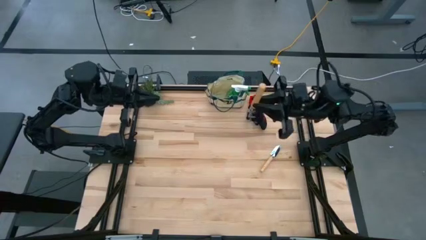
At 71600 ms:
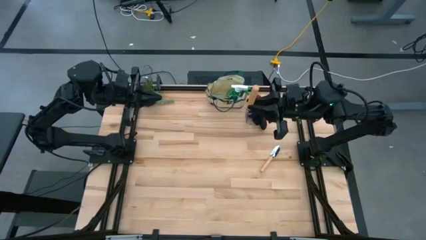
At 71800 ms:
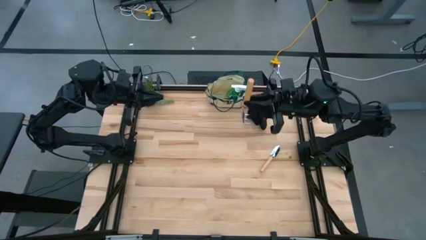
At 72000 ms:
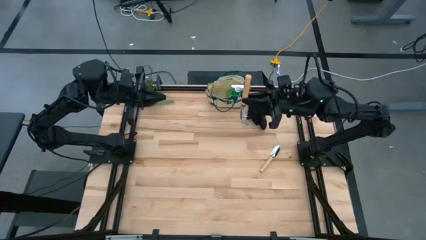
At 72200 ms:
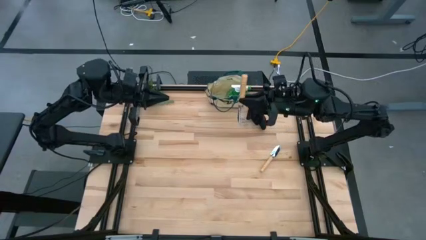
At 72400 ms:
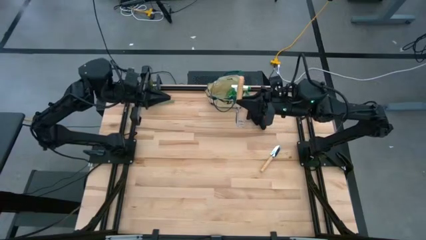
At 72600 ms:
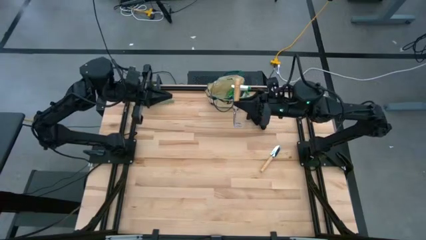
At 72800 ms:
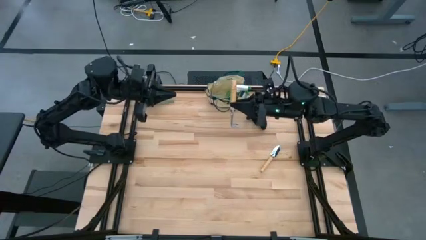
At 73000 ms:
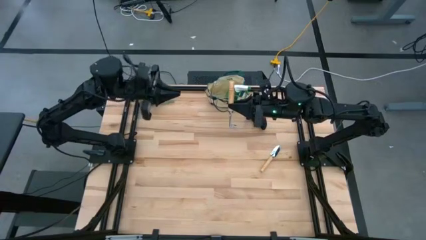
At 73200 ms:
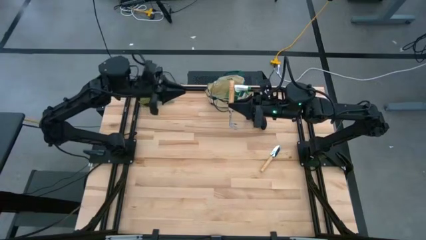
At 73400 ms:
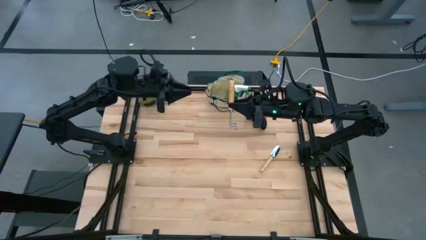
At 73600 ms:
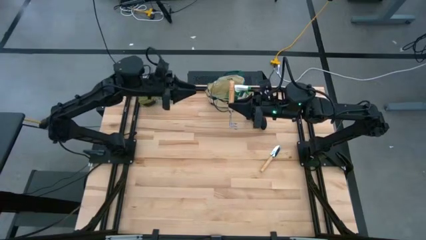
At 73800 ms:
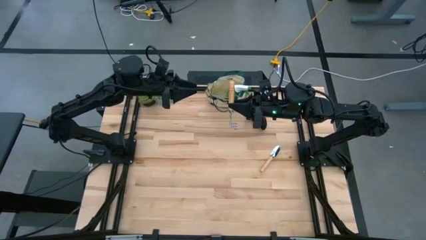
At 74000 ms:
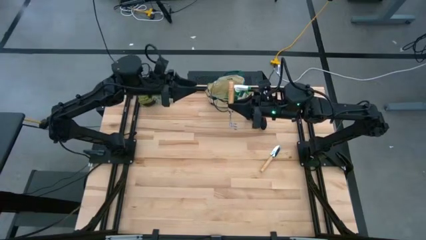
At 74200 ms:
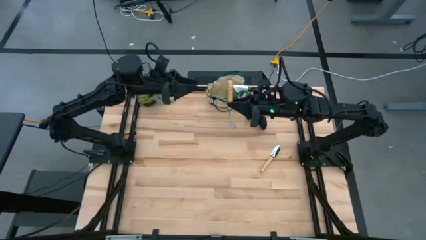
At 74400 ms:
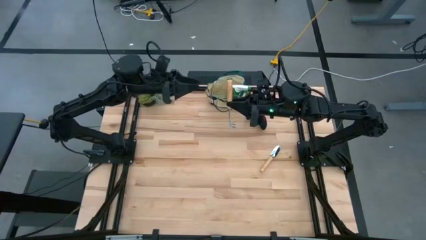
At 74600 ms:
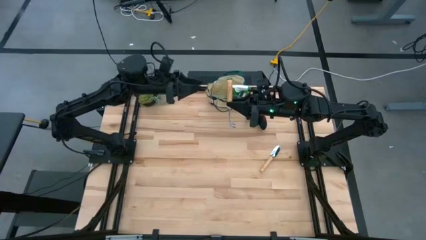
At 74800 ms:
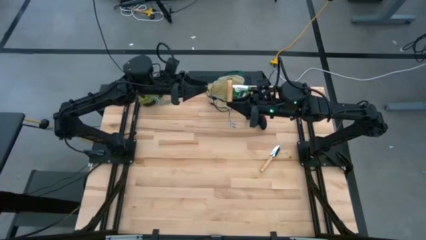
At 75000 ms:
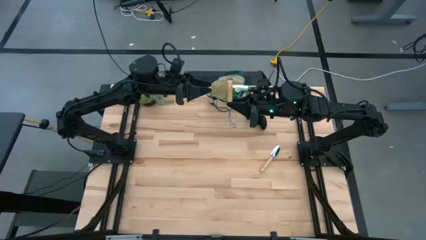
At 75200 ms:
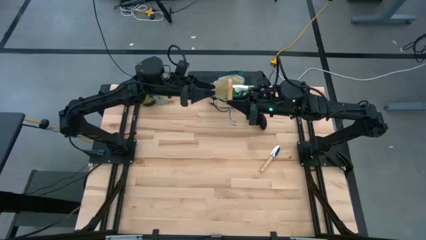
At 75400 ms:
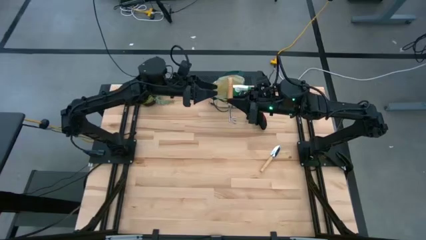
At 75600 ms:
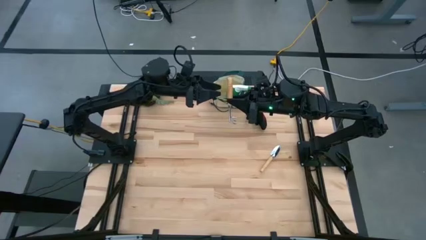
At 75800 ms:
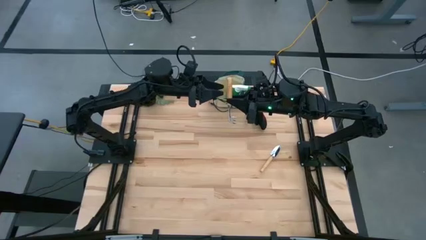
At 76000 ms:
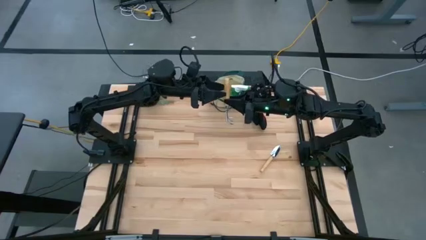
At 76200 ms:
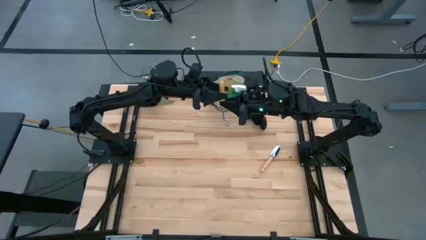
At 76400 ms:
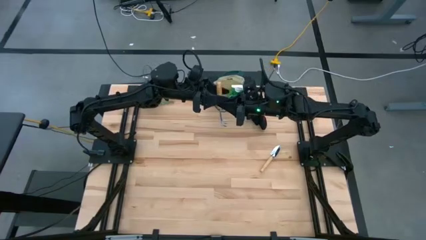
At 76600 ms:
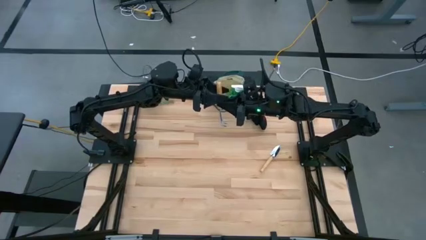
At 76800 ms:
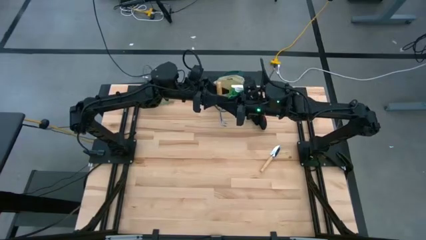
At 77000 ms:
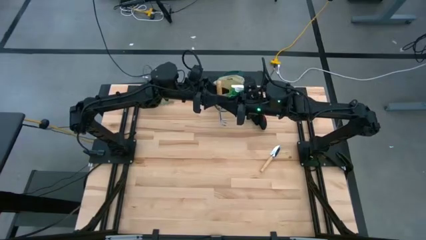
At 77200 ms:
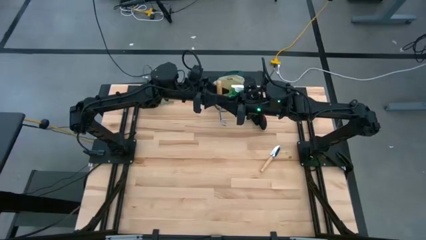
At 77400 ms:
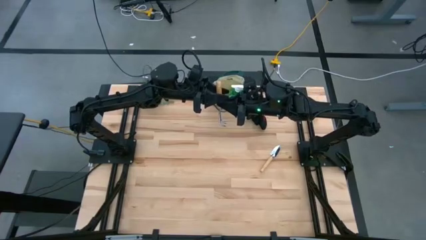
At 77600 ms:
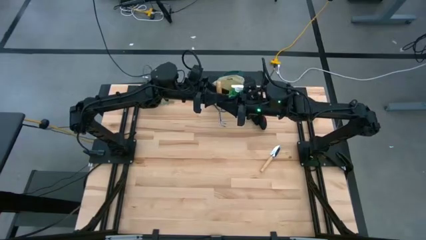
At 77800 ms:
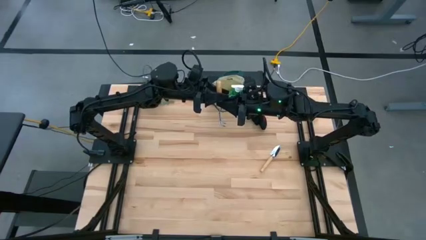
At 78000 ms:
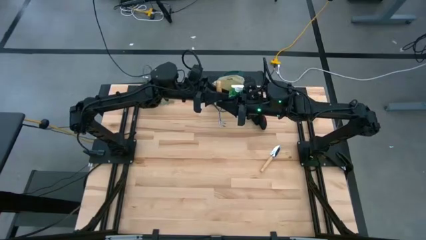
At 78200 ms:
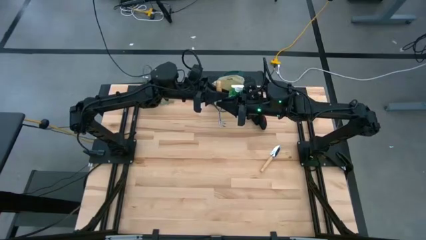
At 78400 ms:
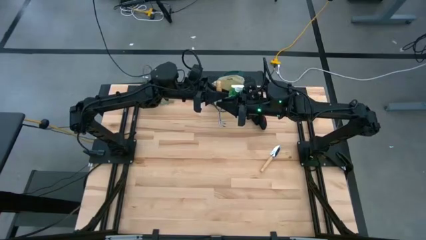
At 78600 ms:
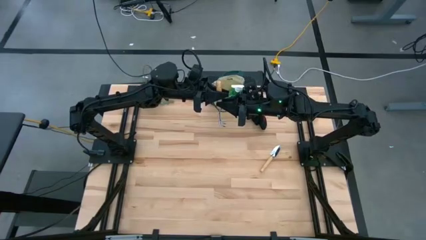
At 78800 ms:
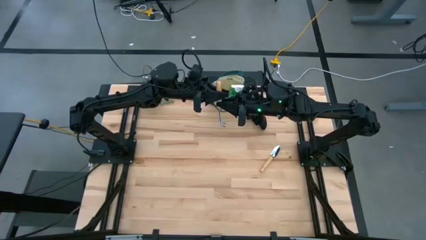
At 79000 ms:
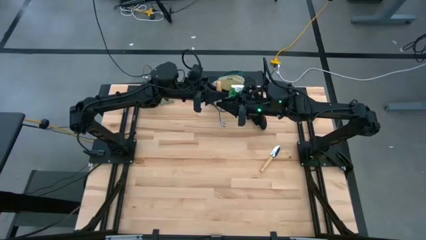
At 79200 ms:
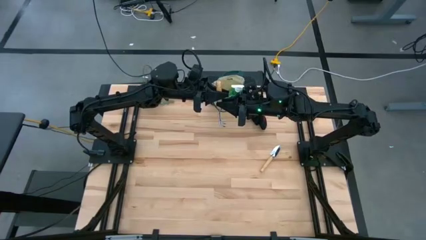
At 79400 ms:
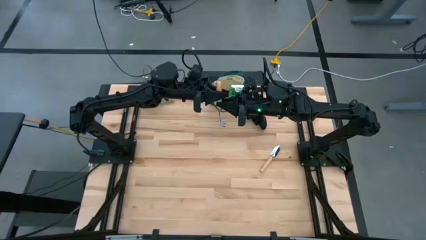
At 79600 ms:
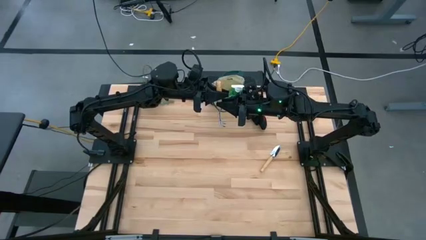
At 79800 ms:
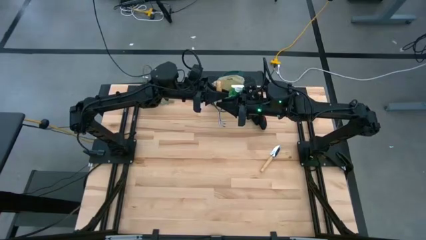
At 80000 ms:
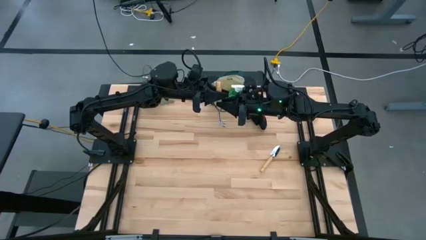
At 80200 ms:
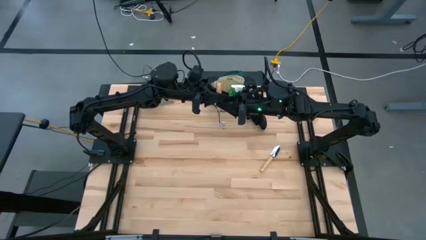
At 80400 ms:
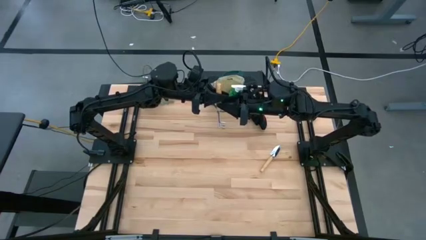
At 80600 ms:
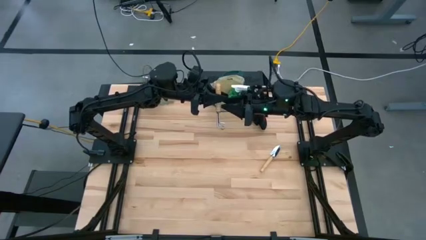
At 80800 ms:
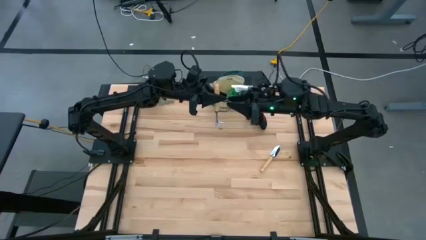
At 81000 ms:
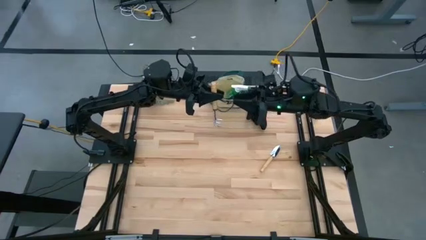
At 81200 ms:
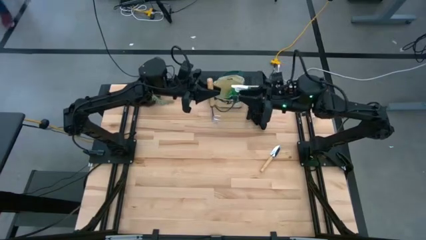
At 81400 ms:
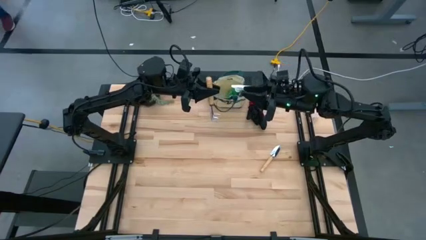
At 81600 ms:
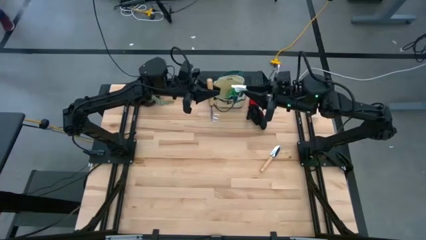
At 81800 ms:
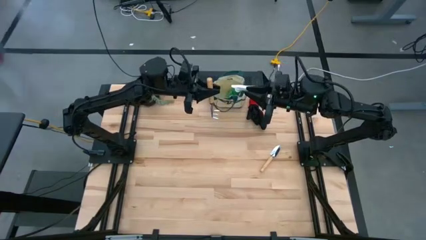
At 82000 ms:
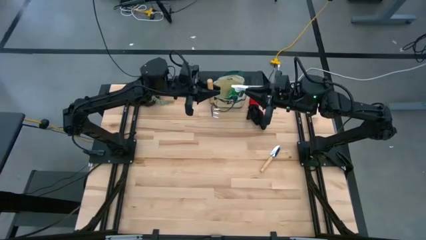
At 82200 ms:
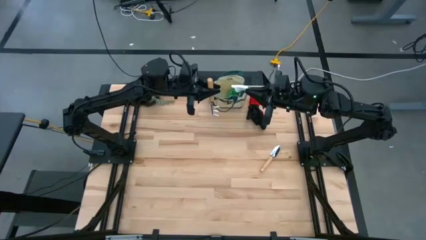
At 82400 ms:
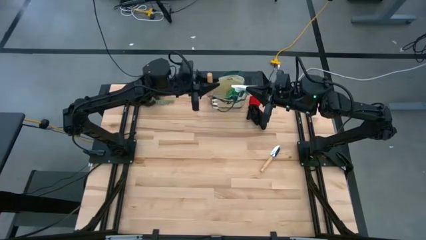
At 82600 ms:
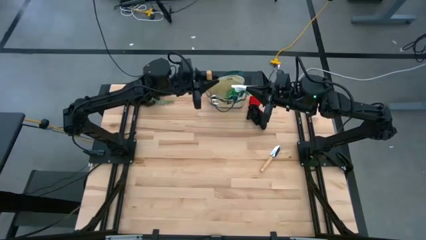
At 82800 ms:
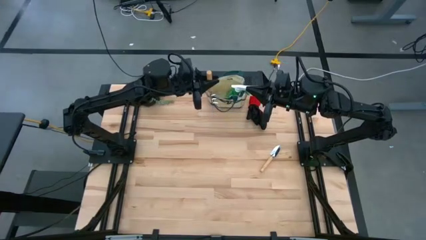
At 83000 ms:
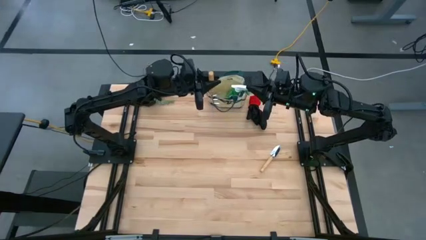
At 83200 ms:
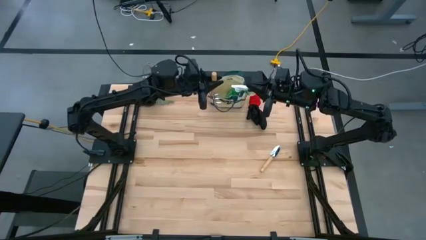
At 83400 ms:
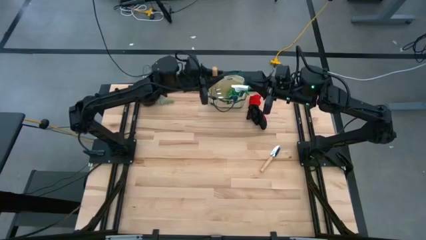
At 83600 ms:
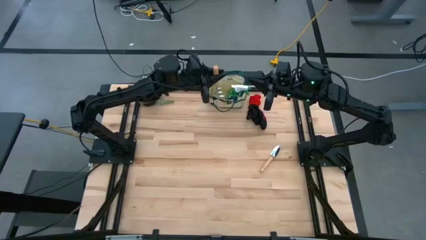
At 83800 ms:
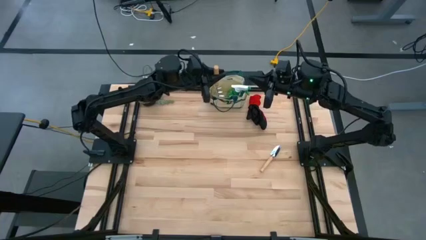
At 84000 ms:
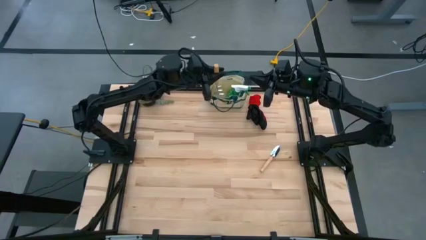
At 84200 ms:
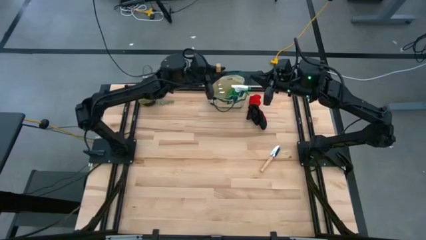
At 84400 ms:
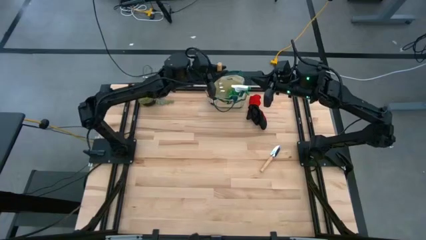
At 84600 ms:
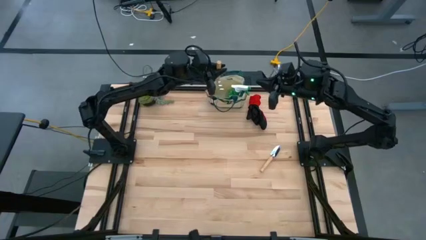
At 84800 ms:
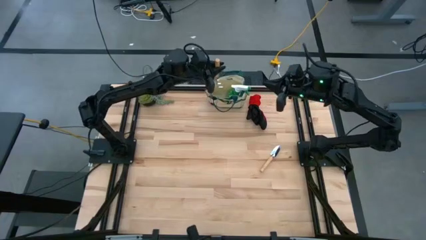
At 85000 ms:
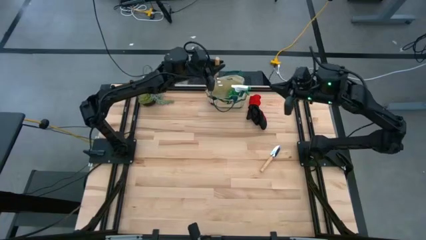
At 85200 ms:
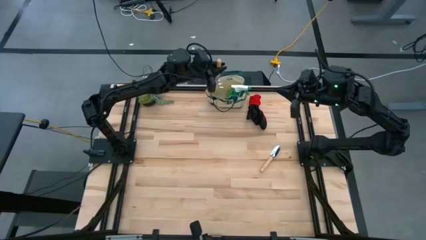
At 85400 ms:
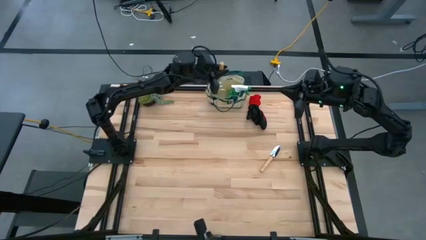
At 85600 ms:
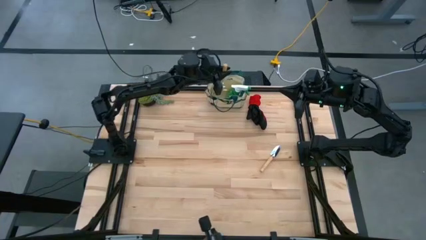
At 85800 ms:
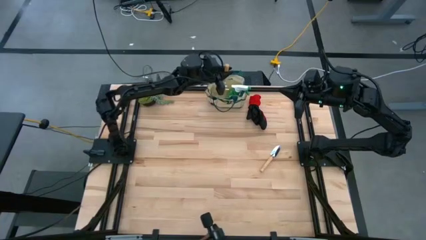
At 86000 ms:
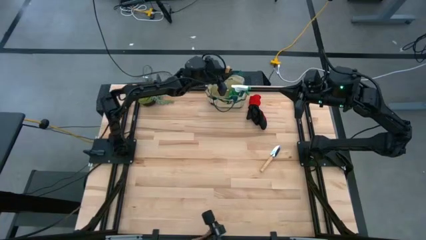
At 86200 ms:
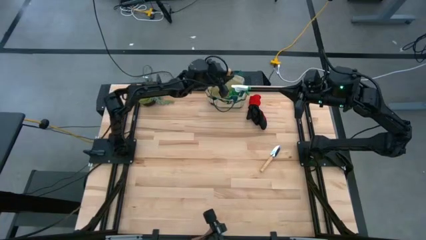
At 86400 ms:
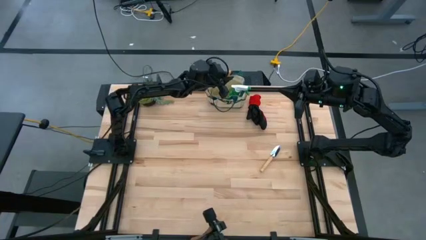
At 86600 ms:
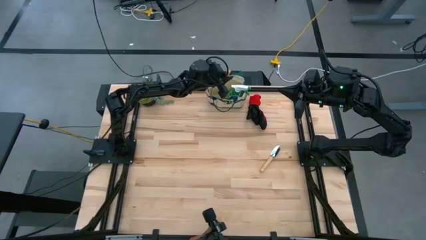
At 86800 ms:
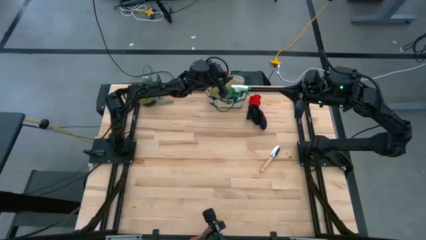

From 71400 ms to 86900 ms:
Task: Pick & Place Garden tools in Gardening bag
Put the brown hand rake into the white gardening bag
